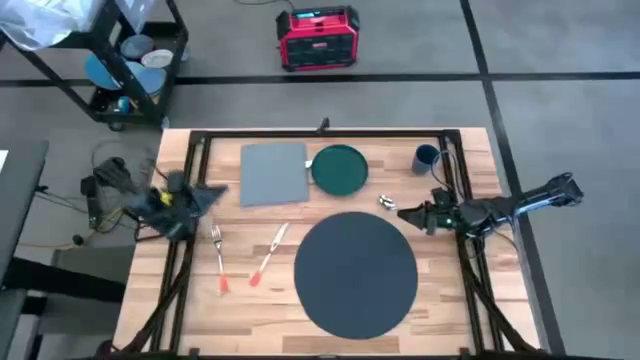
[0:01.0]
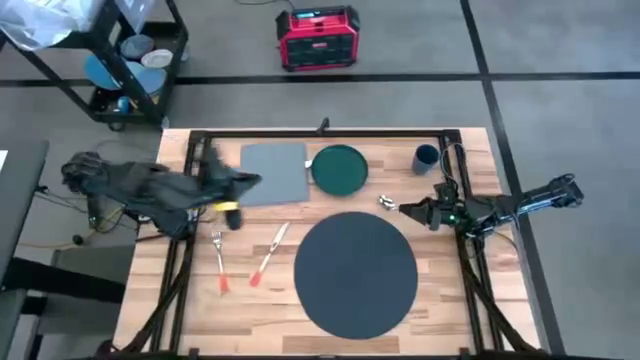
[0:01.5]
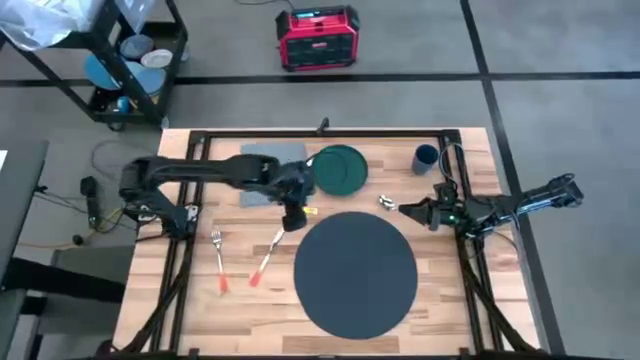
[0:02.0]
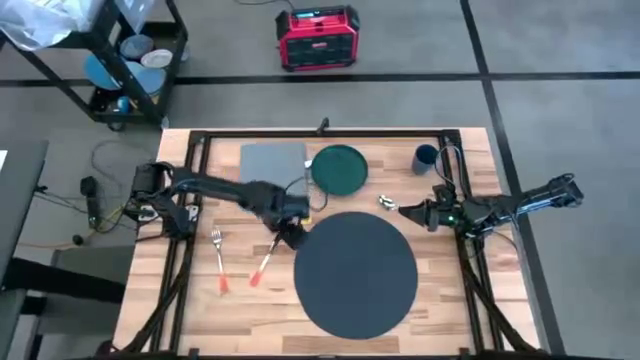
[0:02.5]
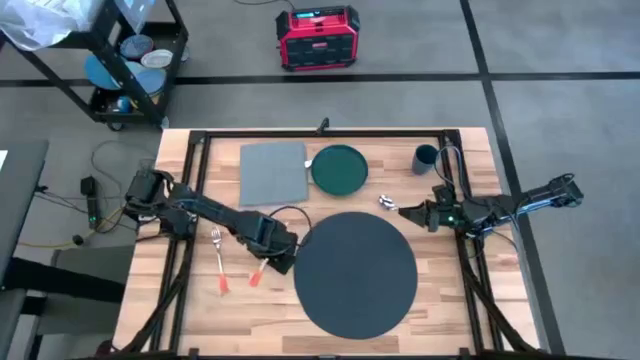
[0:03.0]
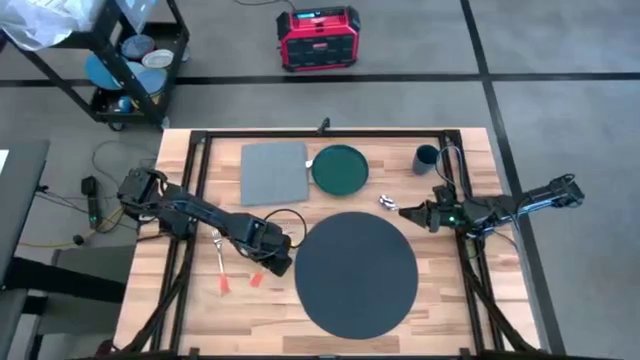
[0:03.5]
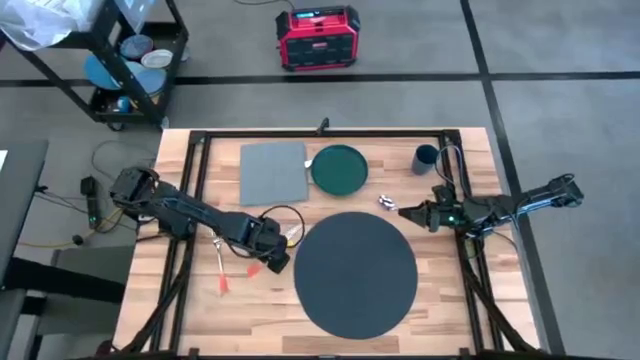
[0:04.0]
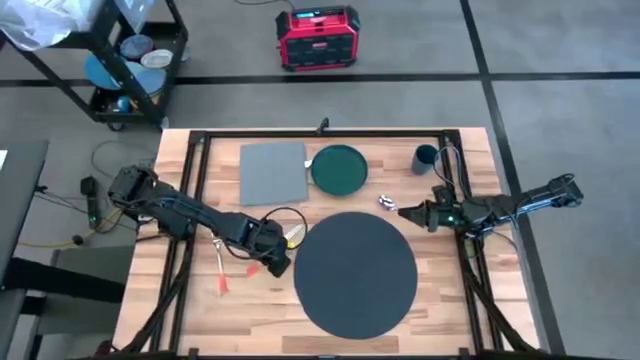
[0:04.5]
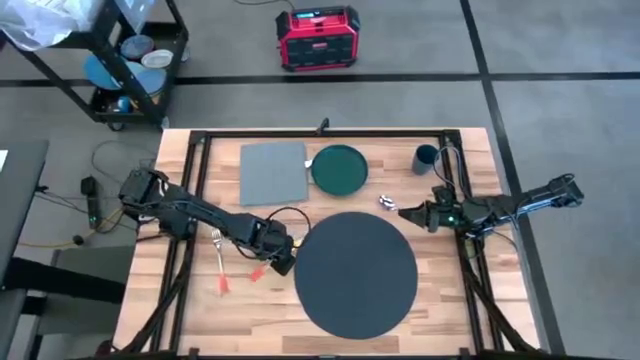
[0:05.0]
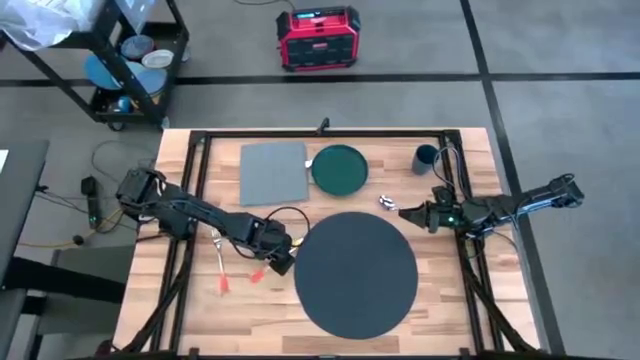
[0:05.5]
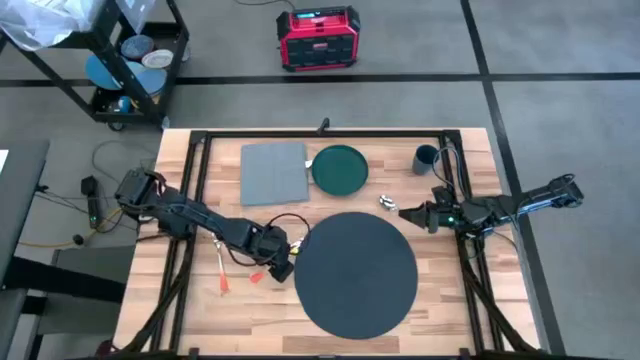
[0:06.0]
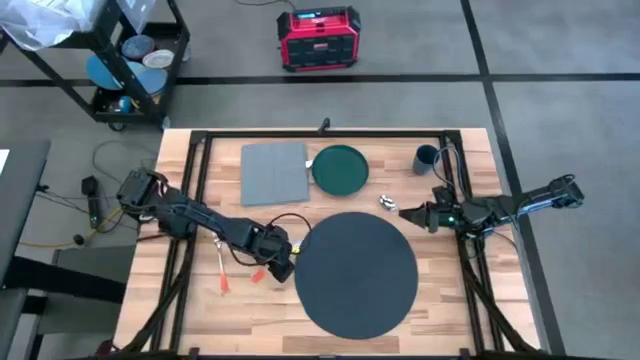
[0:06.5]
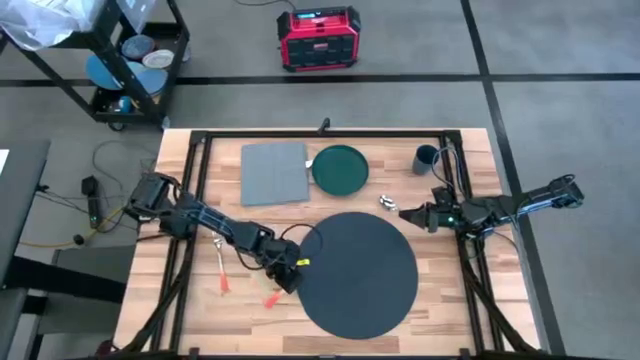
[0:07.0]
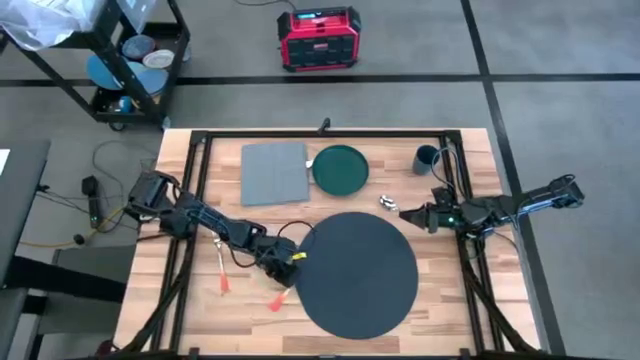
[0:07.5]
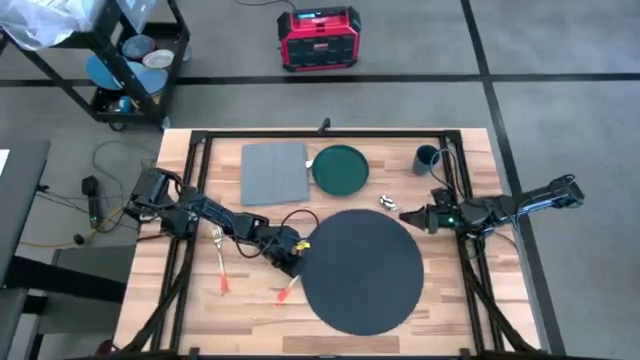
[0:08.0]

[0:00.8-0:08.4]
Task: Set table place
Put the orange table knife on the blue placemat

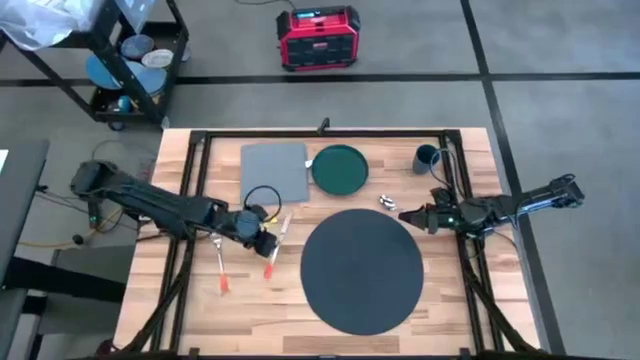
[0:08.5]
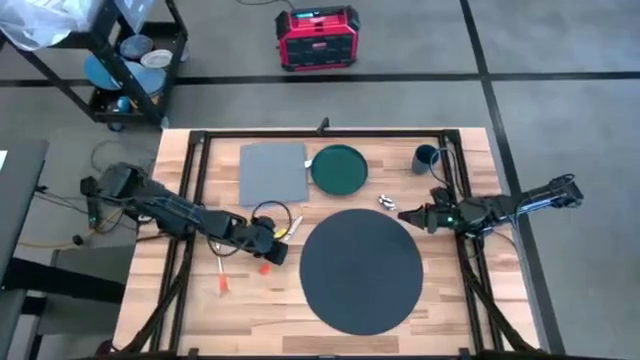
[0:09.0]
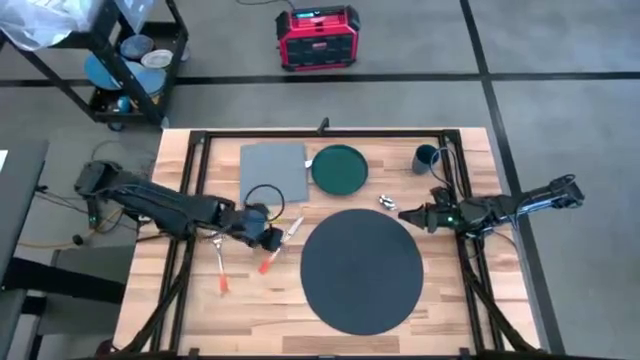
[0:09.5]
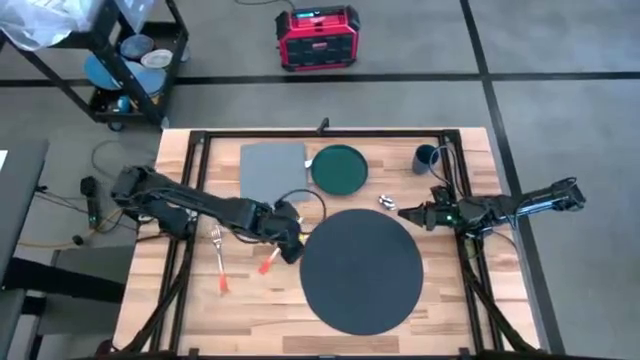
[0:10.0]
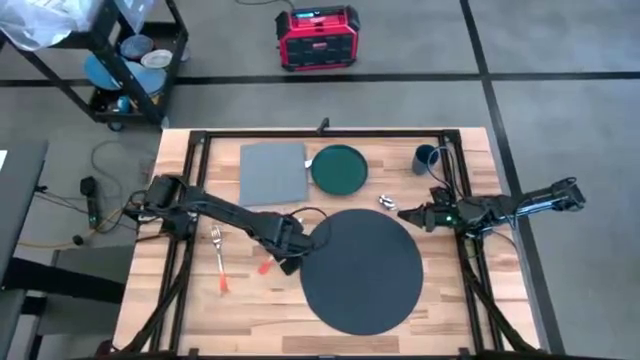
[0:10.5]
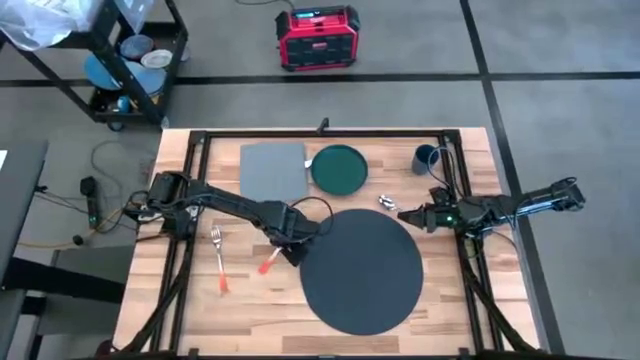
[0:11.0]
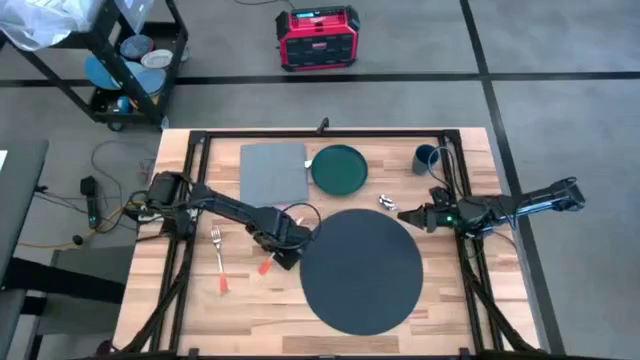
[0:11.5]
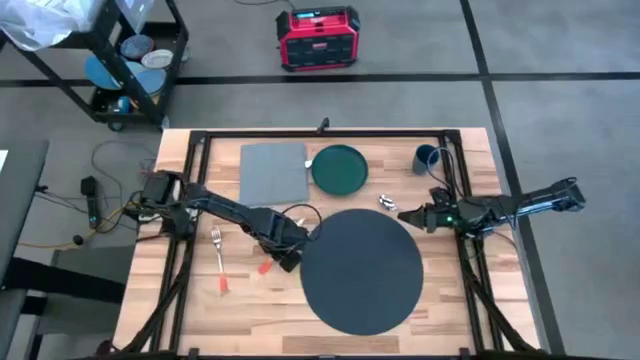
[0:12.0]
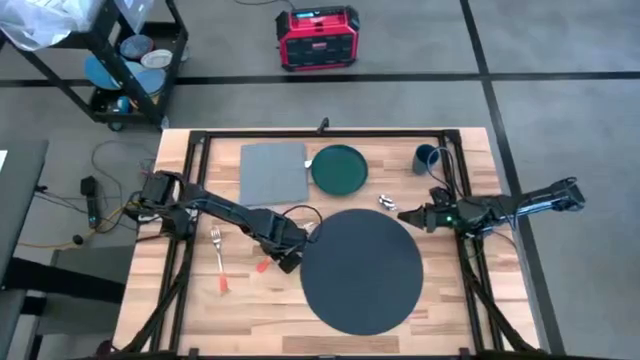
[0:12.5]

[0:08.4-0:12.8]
Put the orange table knife on the blue placemat

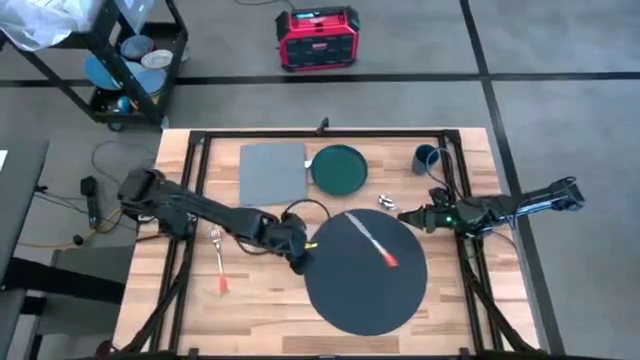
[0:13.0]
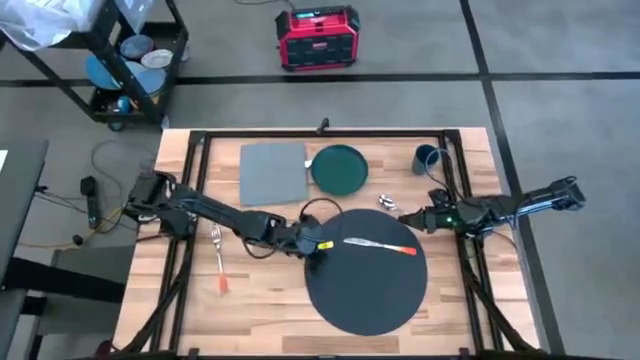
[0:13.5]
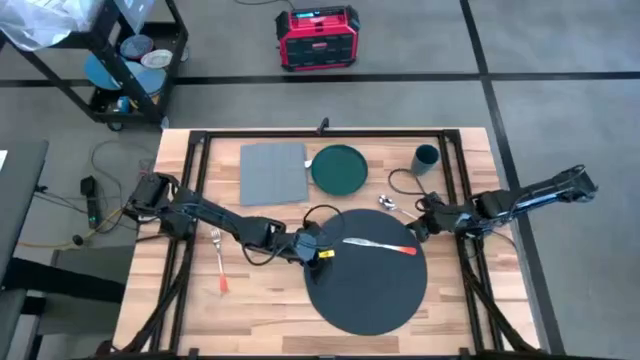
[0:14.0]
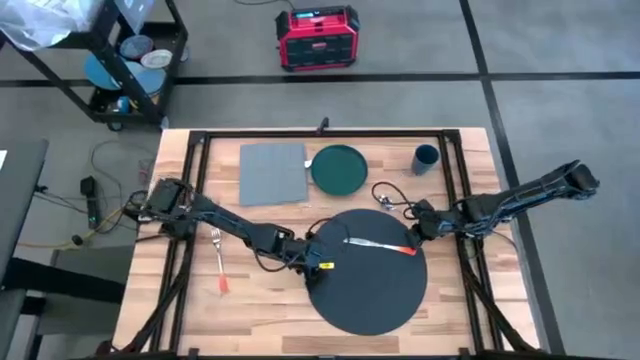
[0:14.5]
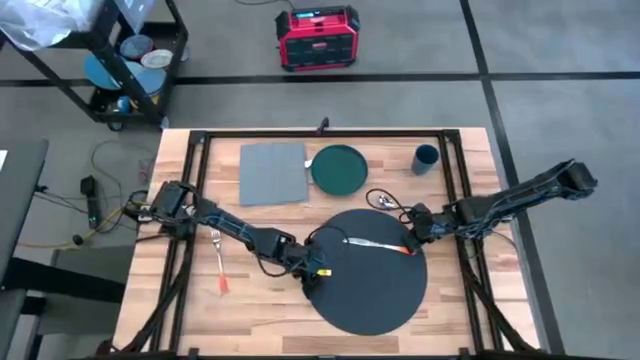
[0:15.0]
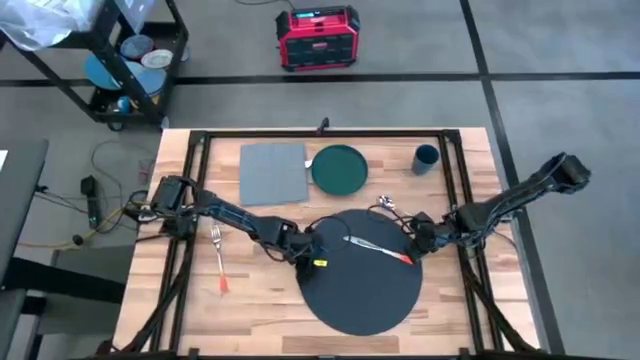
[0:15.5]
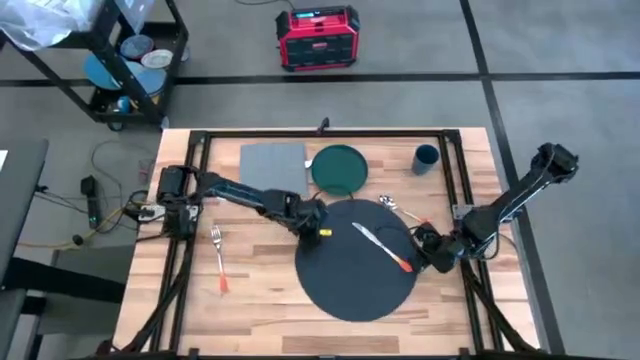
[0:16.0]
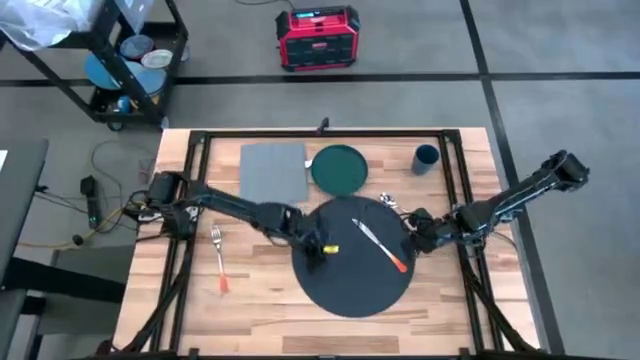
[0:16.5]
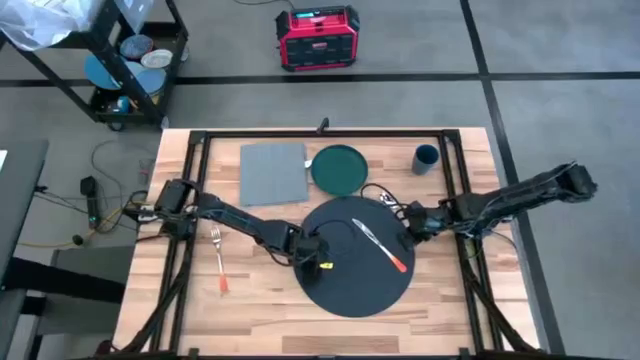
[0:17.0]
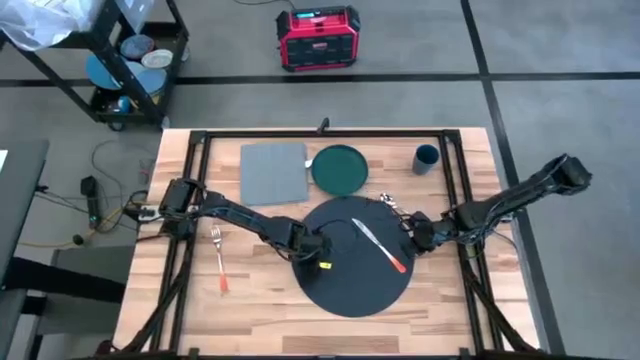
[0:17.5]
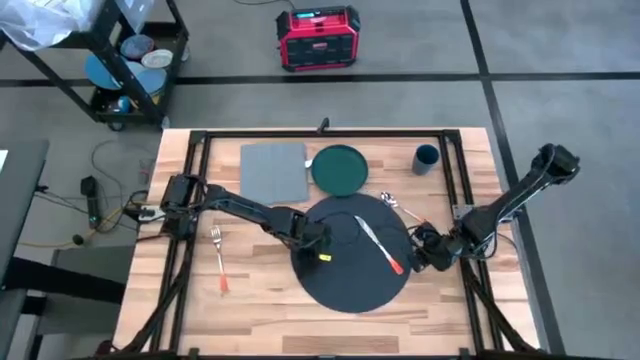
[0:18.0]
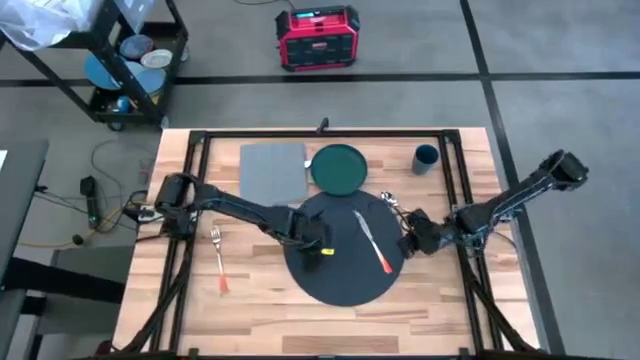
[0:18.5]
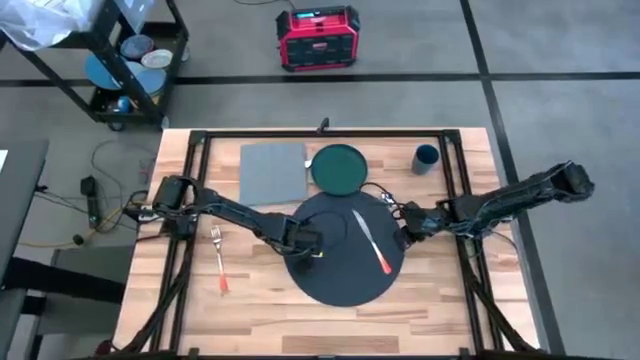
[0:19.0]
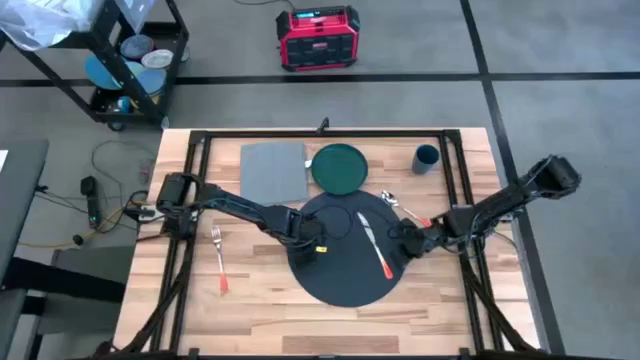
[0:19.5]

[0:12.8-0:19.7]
Adjust the blue placemat on the table

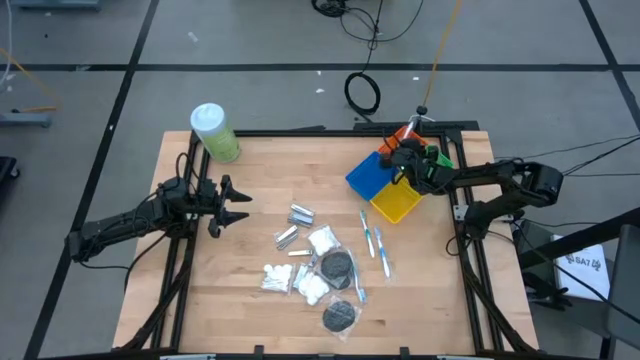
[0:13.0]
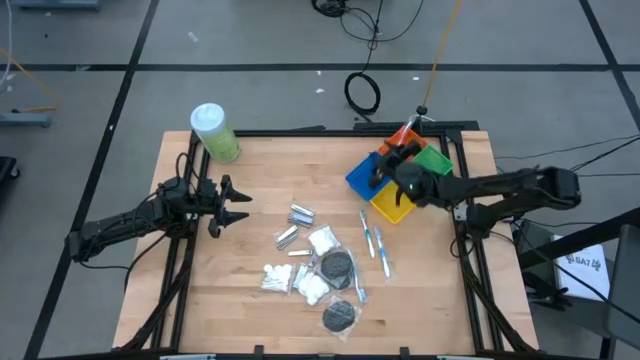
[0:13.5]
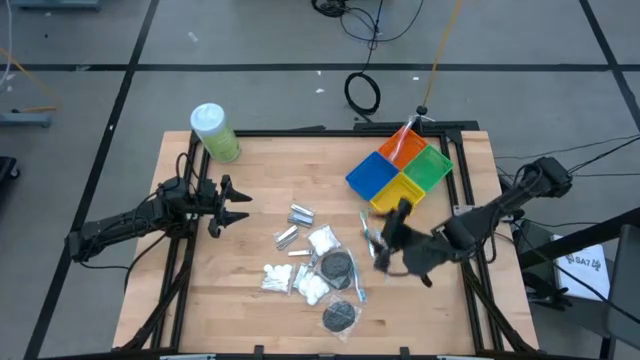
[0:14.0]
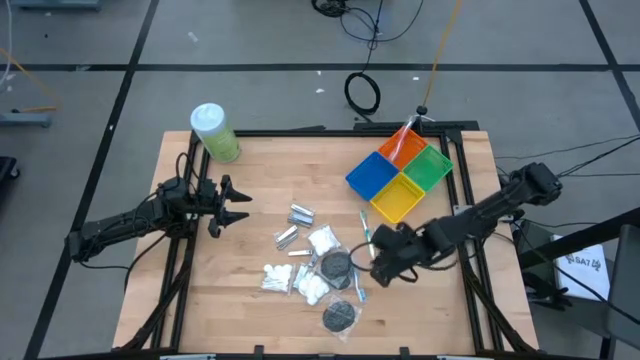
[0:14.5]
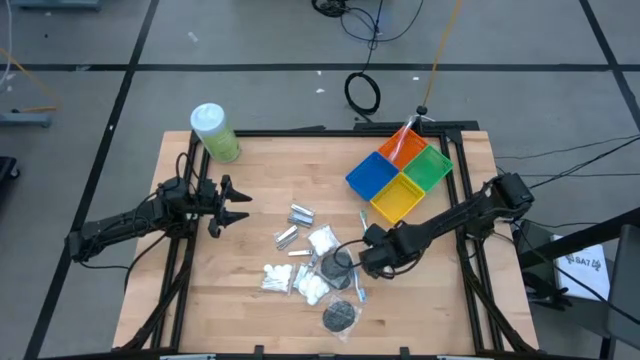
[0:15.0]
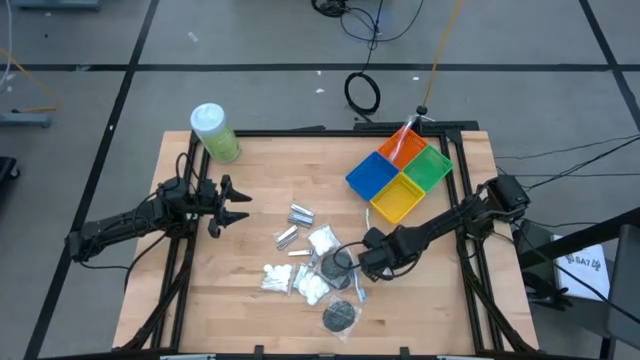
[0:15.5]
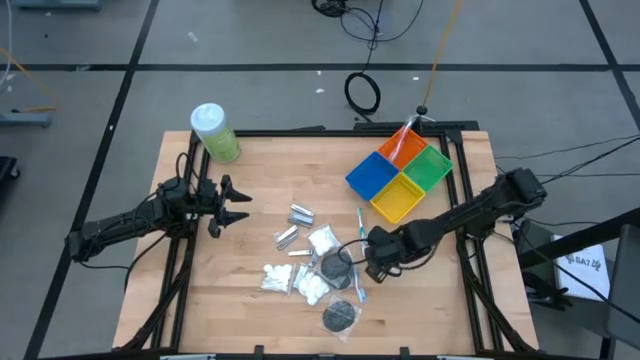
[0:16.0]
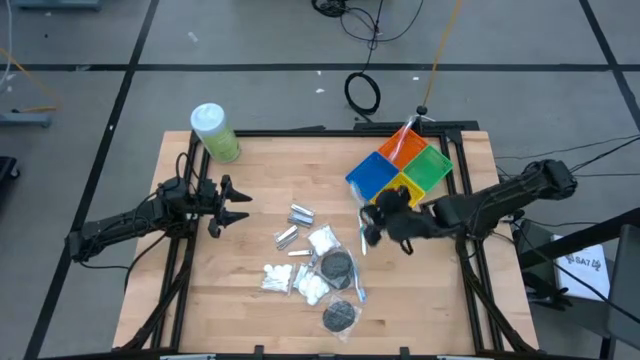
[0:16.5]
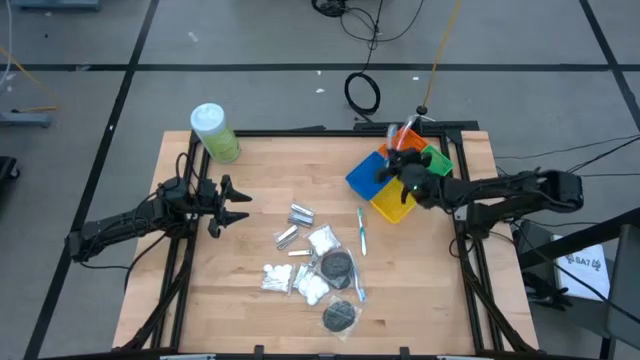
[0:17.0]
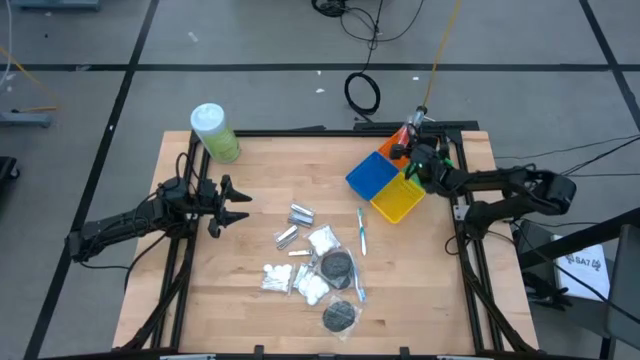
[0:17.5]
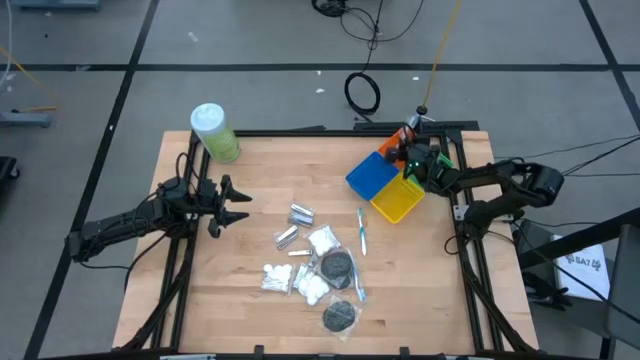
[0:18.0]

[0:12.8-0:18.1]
Task: Pick & Place Travel size toiletries
Put the right blue toothbrush into the orange bin
